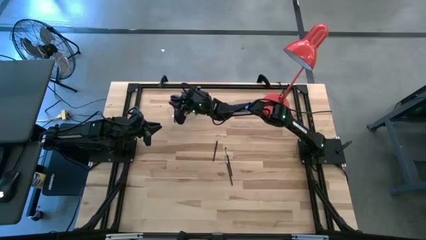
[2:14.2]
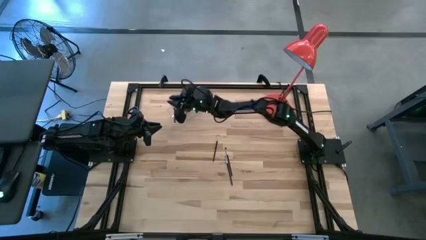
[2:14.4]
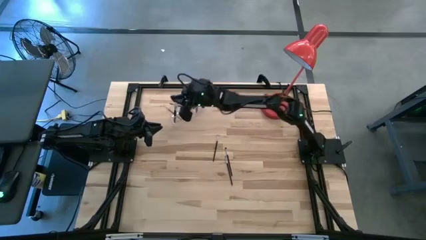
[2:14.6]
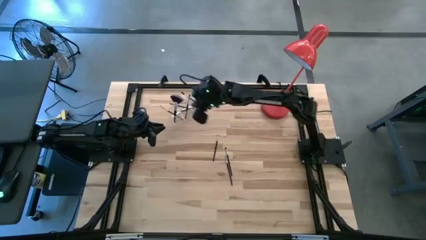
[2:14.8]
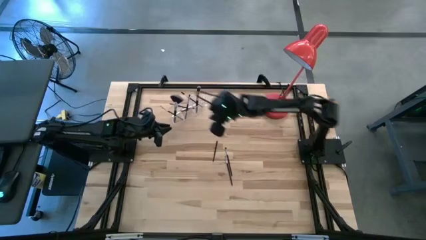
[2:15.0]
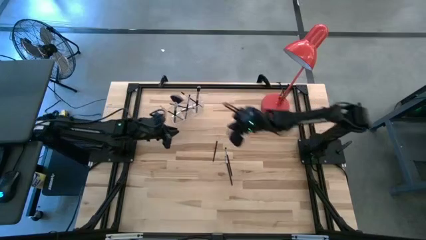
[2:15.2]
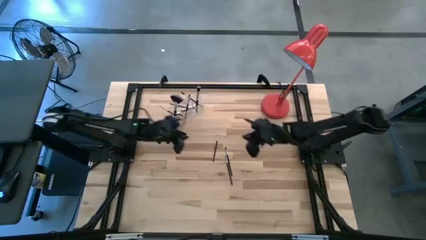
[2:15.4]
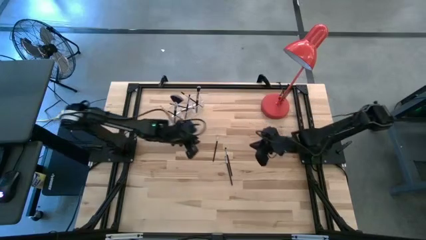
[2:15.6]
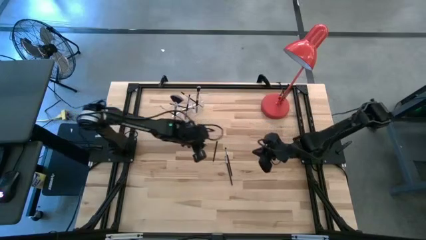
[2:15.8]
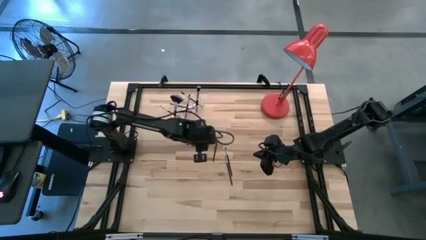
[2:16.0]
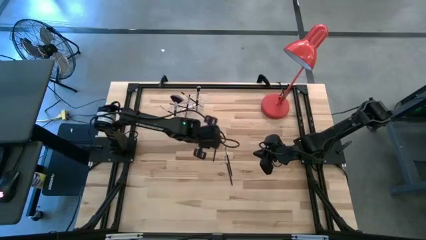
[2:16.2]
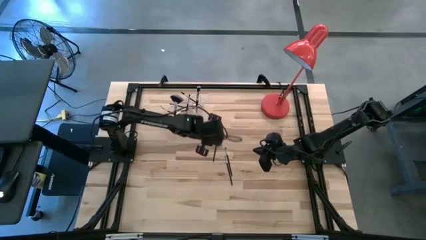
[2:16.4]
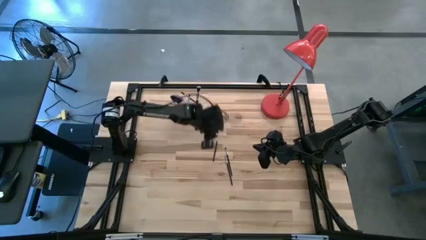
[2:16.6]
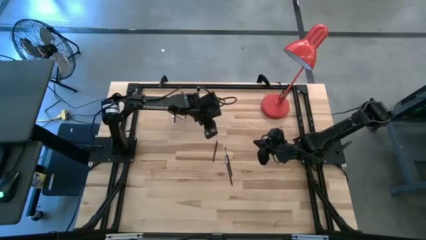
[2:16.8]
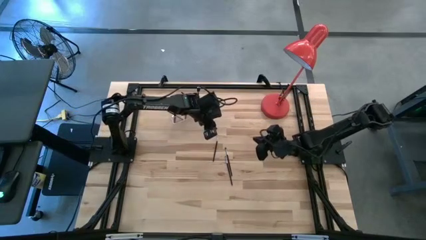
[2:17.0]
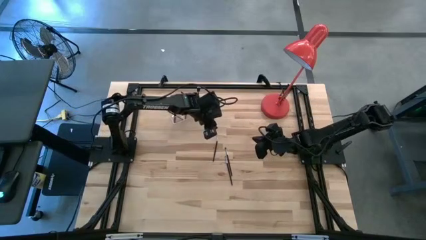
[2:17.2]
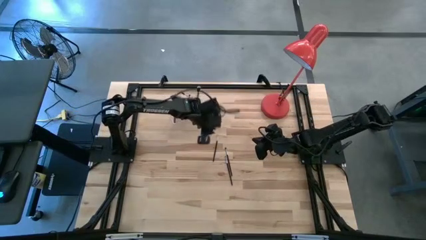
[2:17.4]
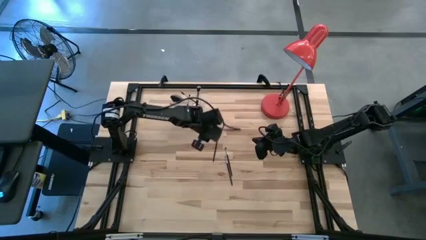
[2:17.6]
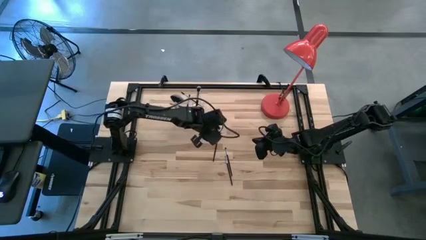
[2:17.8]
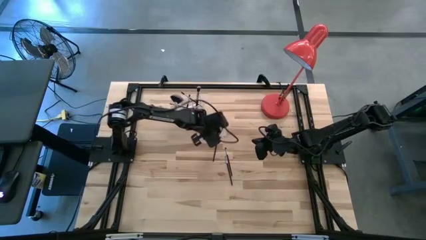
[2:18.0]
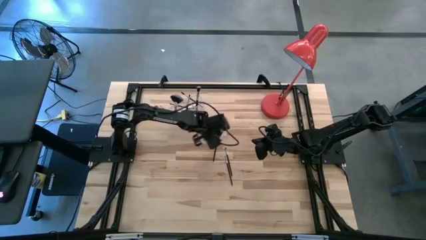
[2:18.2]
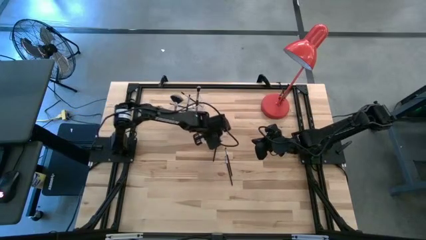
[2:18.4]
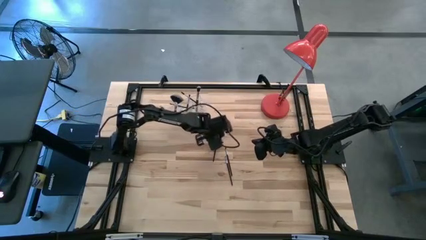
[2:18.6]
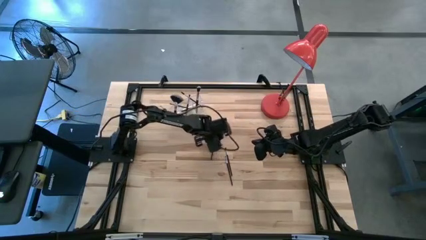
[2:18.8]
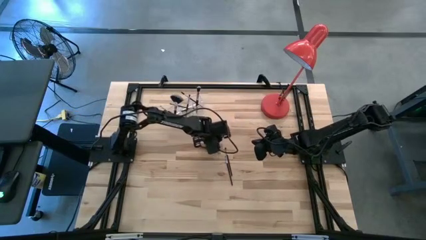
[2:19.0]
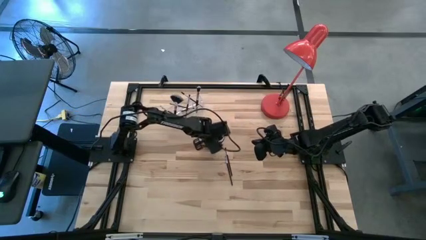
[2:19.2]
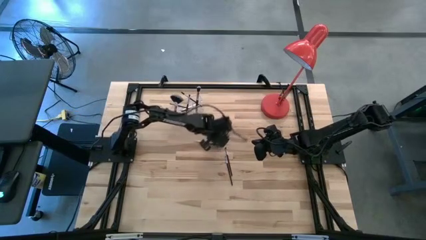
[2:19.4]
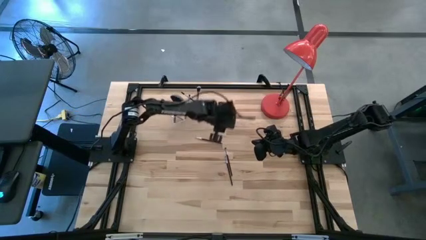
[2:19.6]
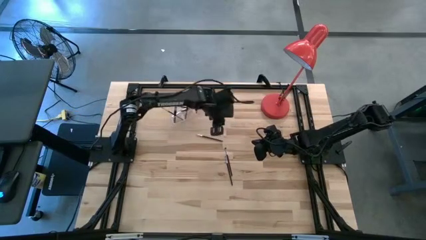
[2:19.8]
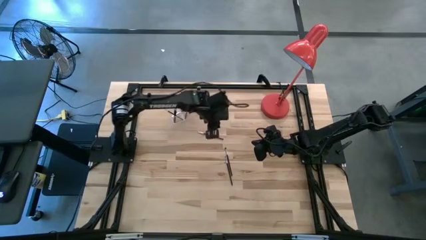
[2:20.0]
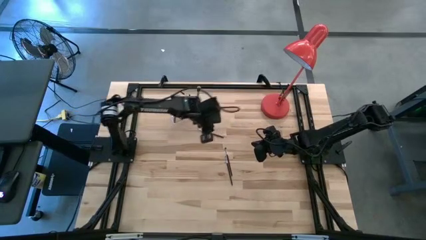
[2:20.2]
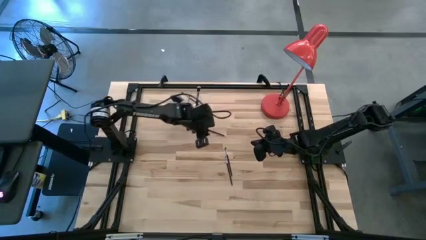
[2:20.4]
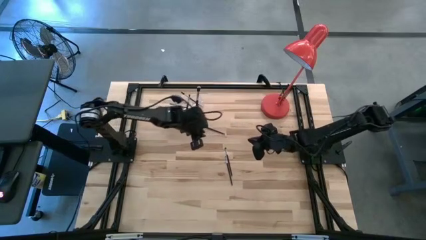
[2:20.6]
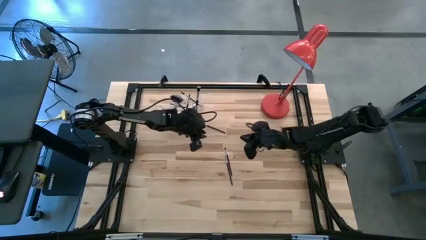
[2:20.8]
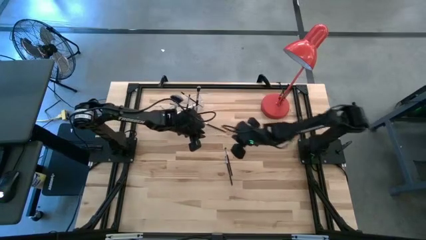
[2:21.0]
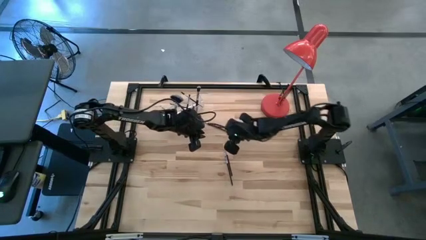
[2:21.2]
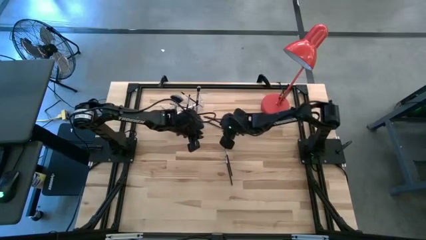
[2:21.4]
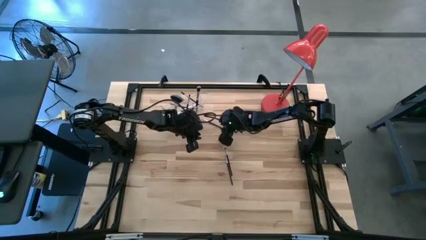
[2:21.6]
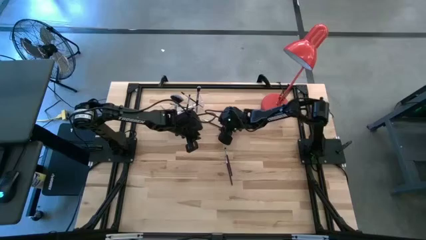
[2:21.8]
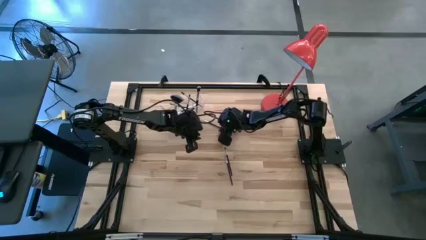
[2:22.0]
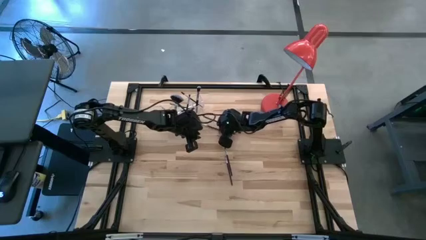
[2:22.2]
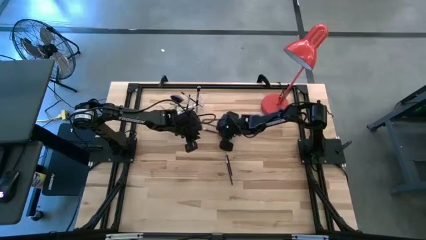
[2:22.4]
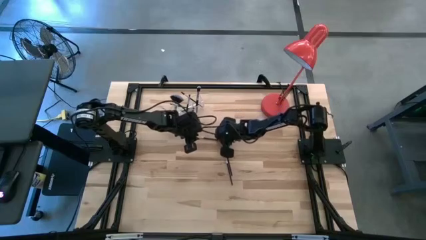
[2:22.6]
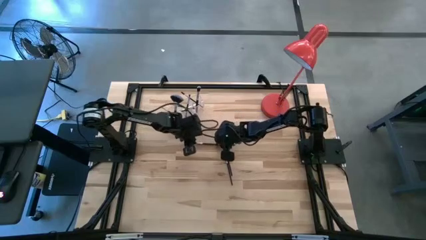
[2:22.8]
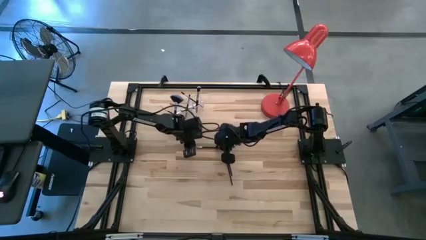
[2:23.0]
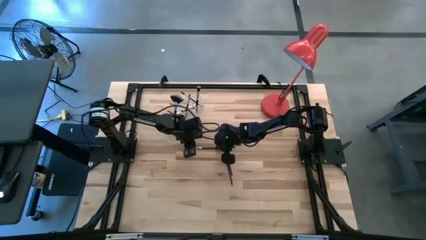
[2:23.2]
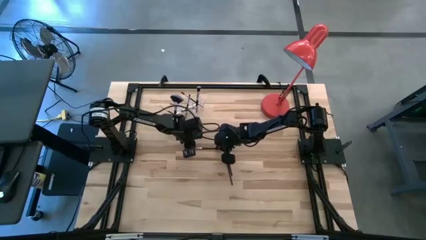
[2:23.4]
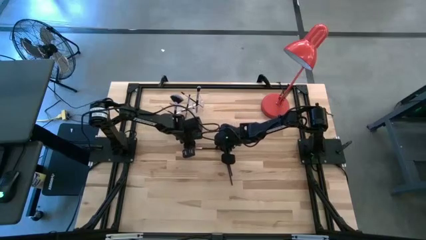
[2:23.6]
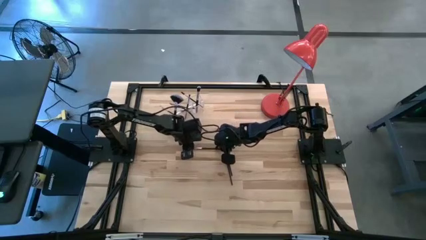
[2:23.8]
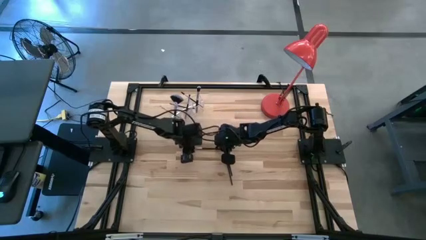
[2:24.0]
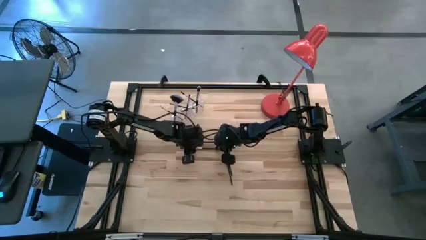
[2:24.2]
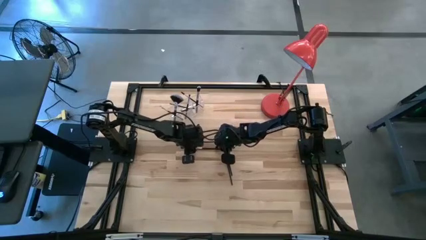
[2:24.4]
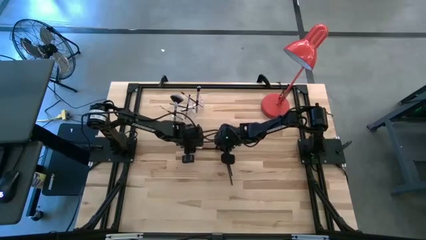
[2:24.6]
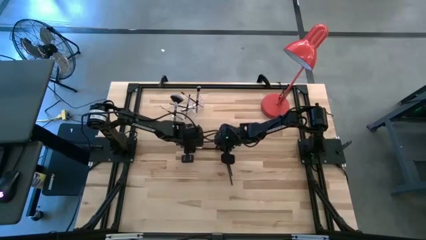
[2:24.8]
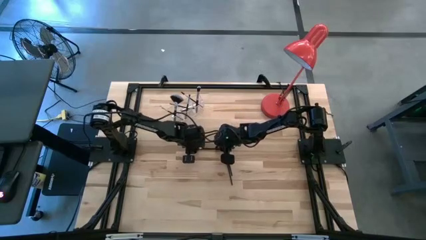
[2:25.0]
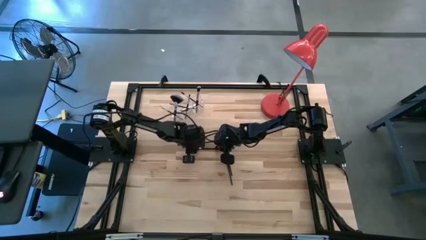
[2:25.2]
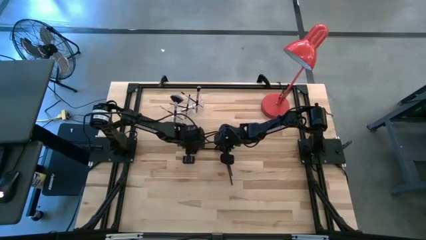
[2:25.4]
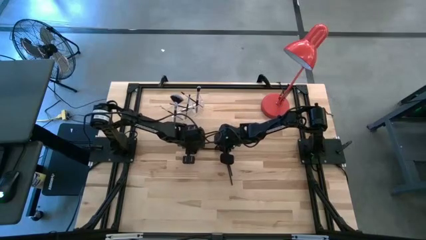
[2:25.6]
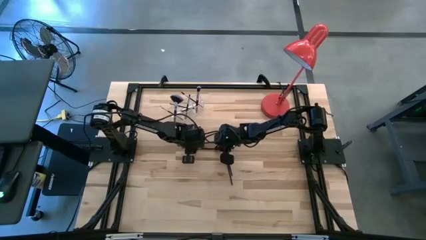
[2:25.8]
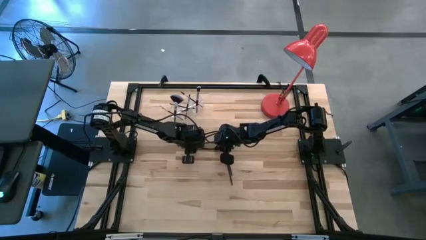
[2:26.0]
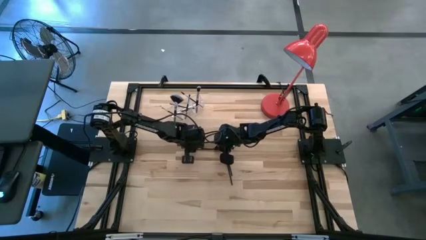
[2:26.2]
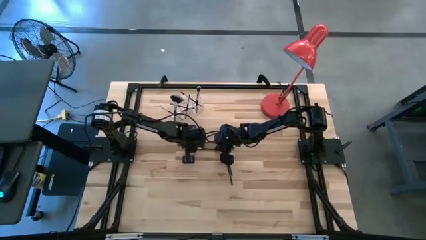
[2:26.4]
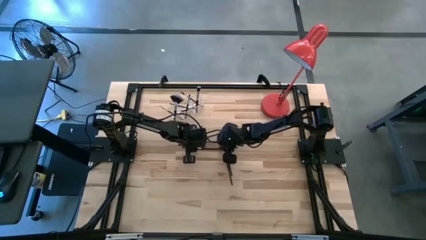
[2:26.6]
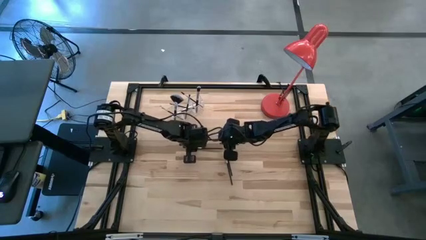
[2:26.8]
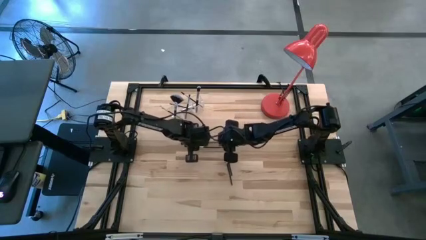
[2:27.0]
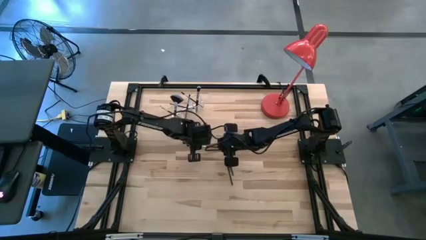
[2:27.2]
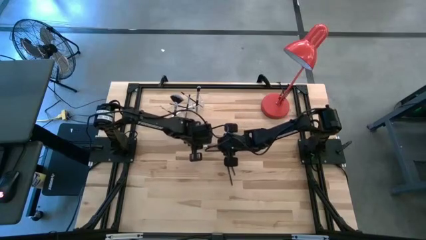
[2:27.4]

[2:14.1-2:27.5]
Task: Put items in baskets/containers
Put the liner brush into the transparent organizer

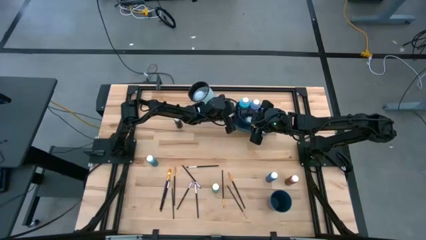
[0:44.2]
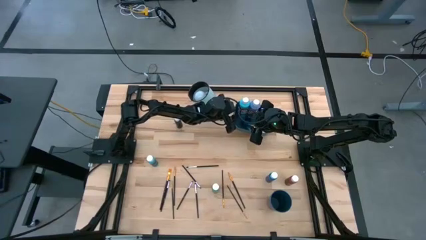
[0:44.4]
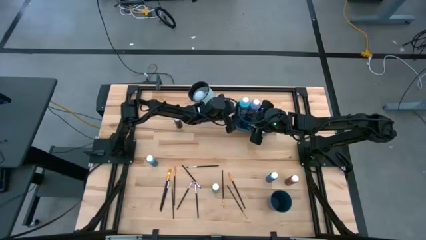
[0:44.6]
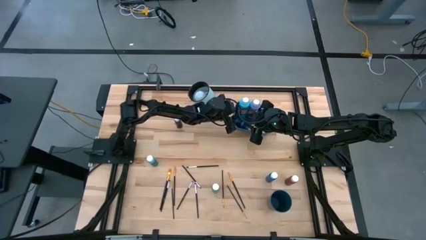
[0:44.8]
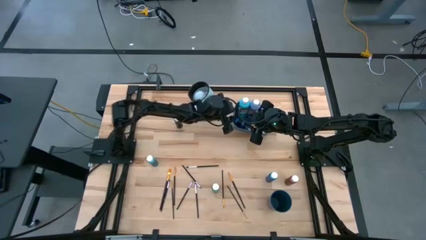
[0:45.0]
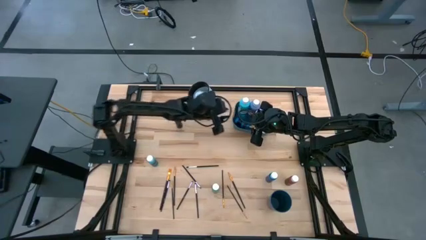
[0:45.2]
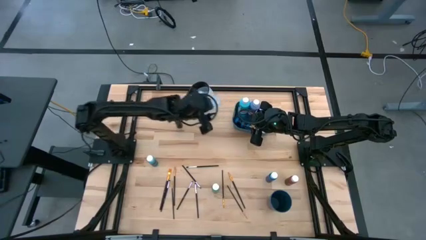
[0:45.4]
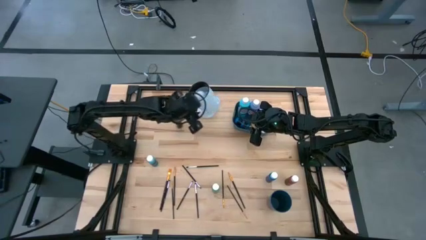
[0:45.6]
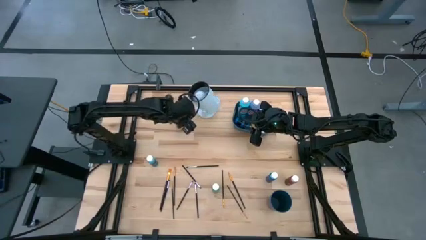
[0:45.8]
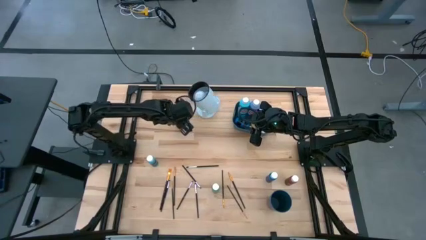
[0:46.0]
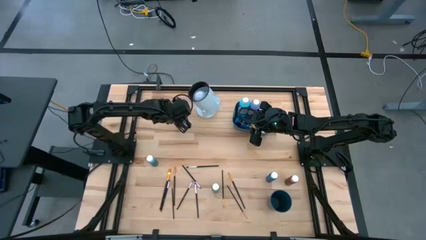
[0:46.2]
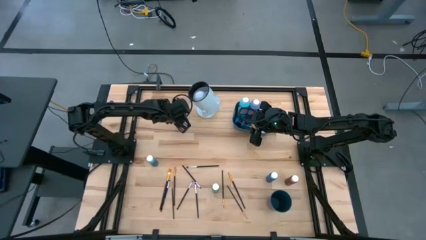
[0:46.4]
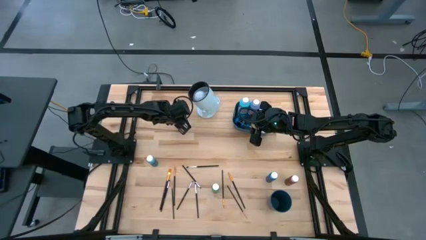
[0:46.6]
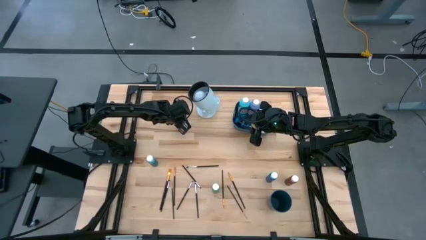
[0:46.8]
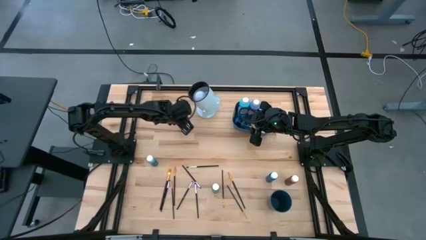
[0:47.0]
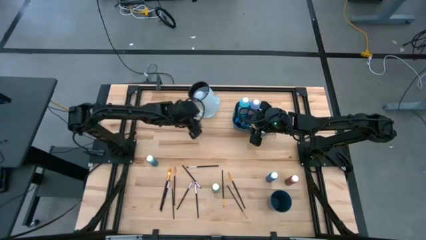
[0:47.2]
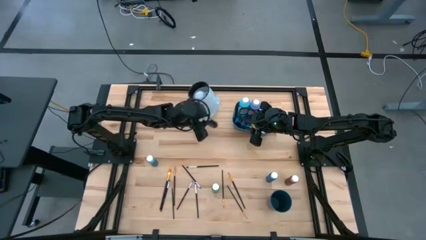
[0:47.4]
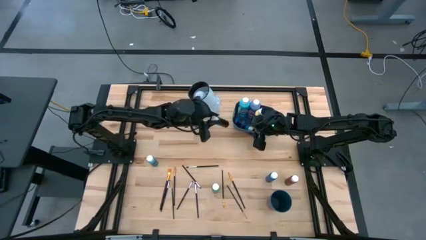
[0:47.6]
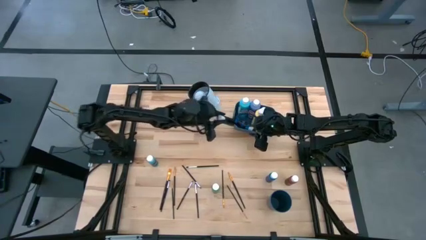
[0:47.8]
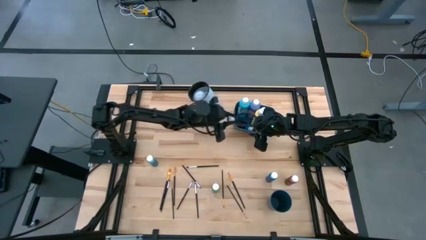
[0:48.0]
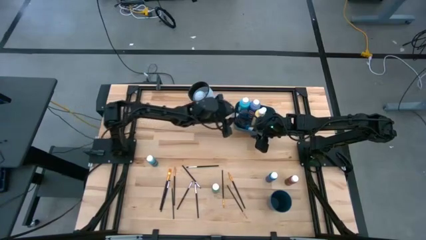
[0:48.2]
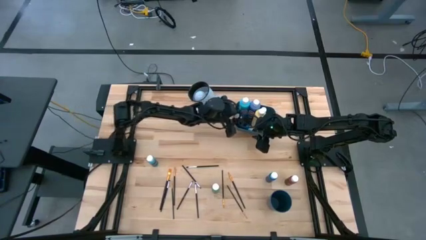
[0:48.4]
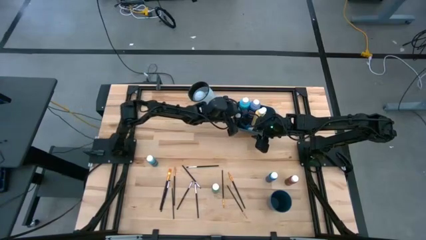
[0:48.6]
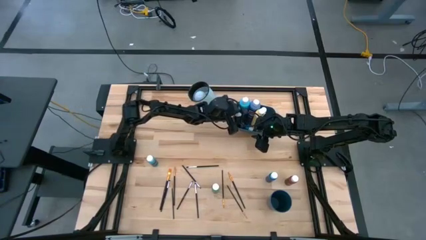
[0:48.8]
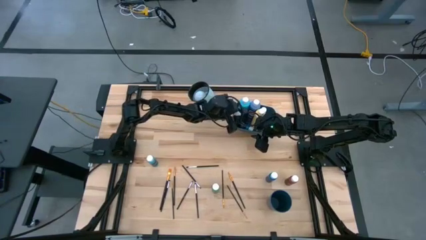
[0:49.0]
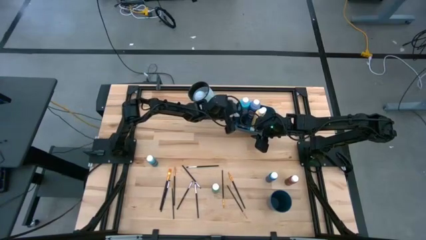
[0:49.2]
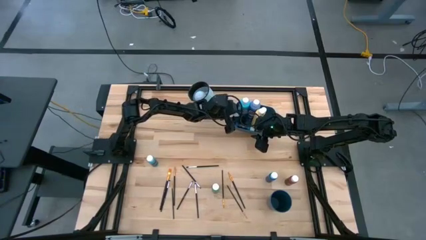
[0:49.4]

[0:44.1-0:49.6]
Task: Pick & Place Paint Supplies
Put the black paint bottle into the blue bin
